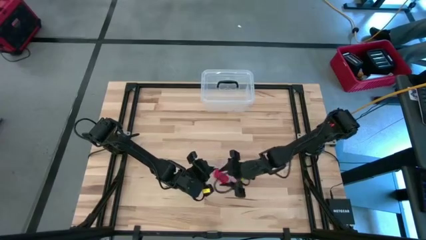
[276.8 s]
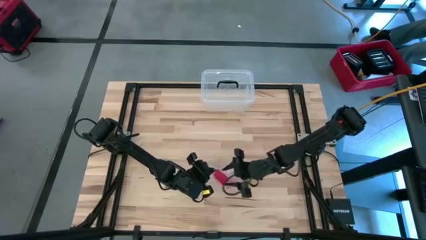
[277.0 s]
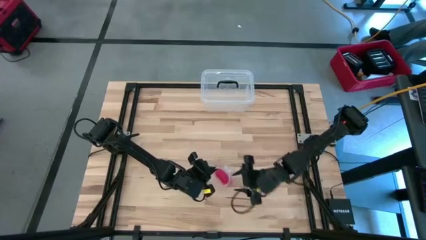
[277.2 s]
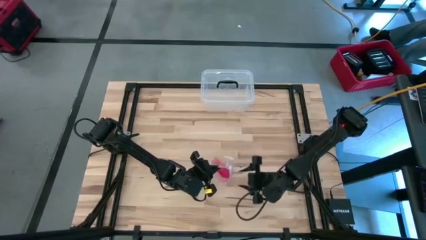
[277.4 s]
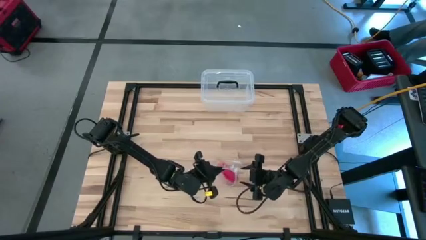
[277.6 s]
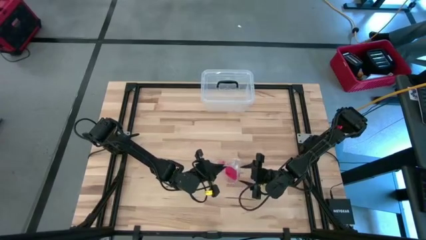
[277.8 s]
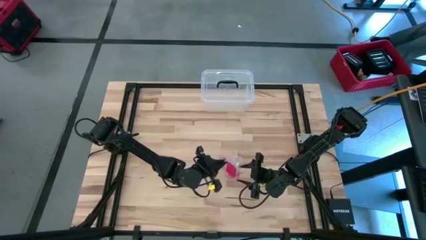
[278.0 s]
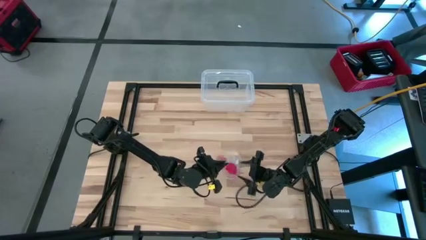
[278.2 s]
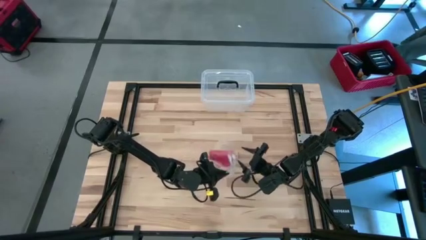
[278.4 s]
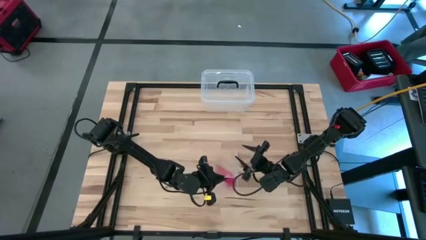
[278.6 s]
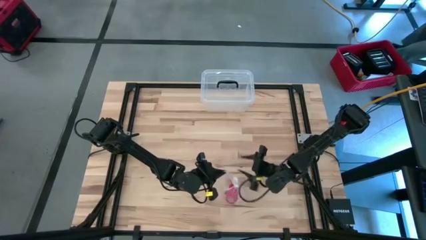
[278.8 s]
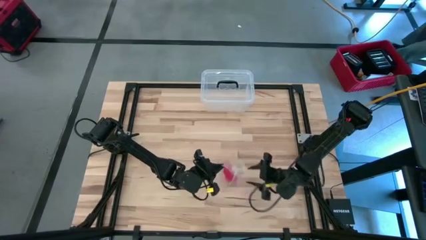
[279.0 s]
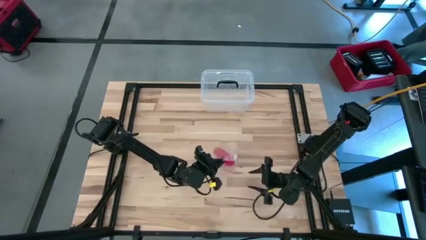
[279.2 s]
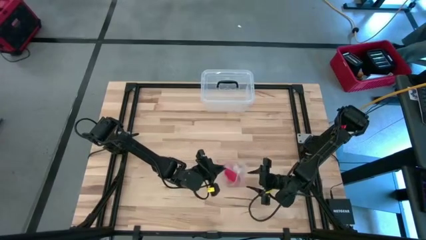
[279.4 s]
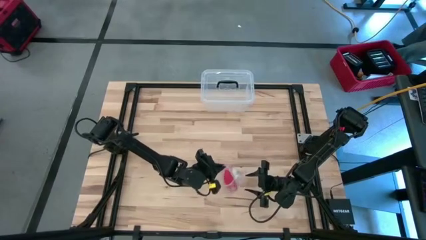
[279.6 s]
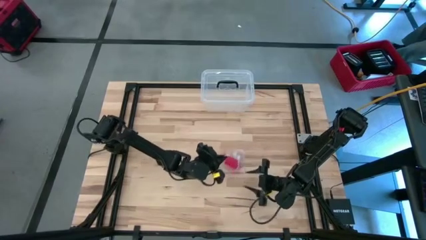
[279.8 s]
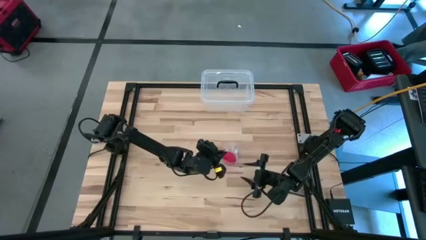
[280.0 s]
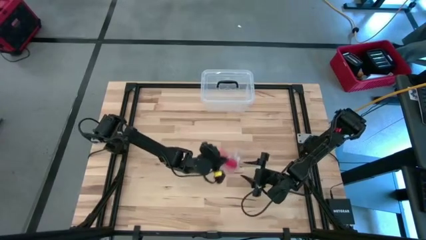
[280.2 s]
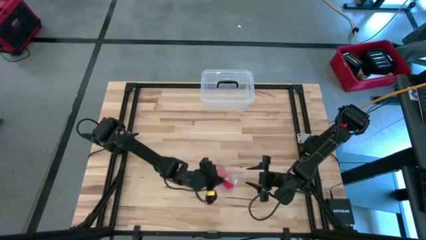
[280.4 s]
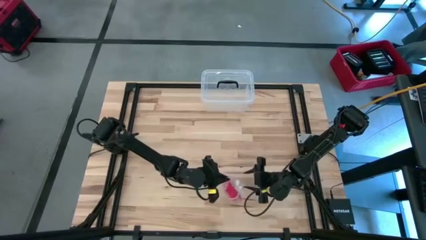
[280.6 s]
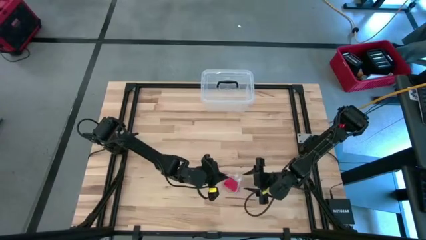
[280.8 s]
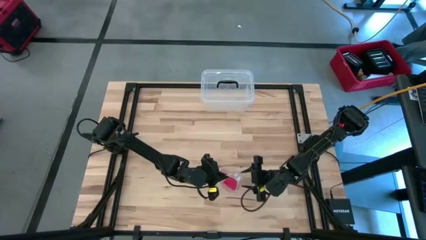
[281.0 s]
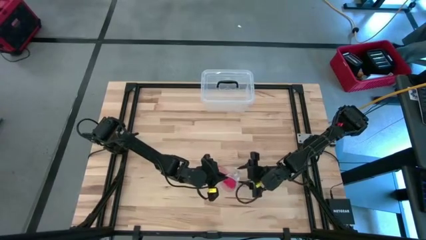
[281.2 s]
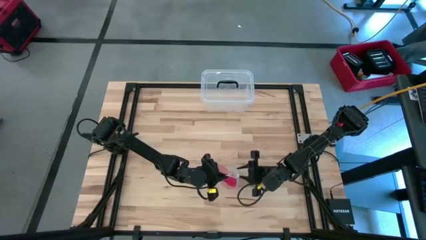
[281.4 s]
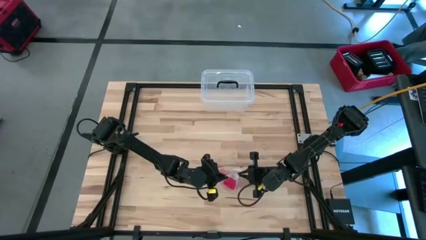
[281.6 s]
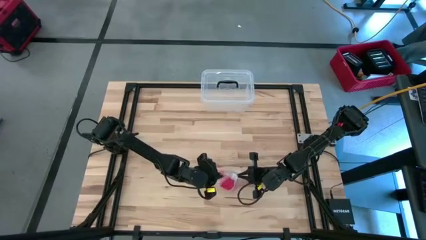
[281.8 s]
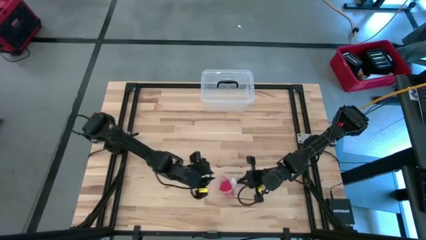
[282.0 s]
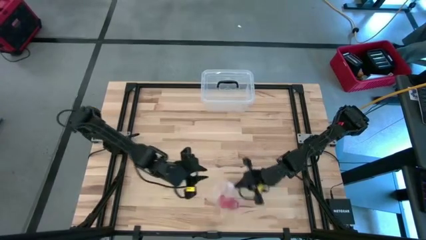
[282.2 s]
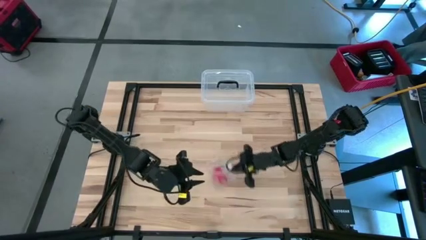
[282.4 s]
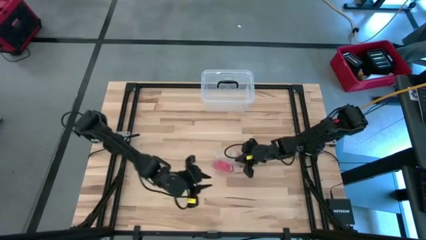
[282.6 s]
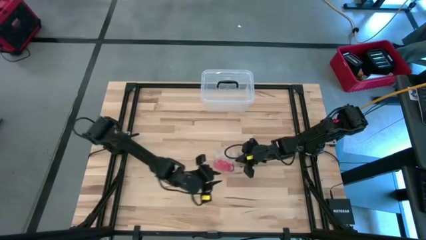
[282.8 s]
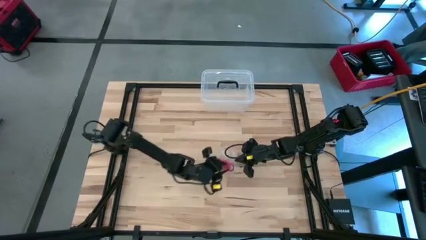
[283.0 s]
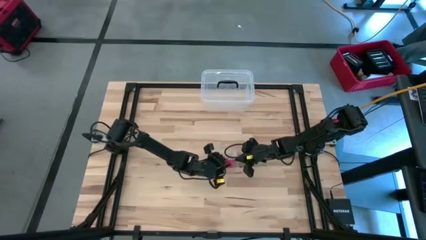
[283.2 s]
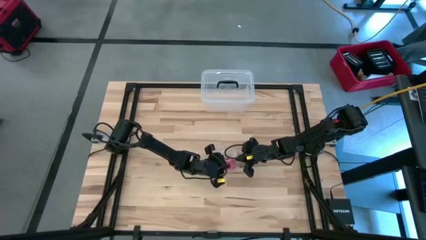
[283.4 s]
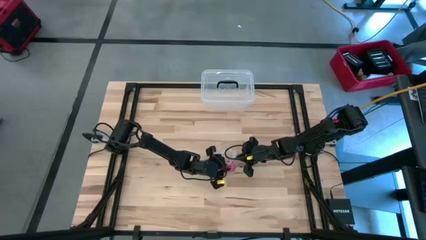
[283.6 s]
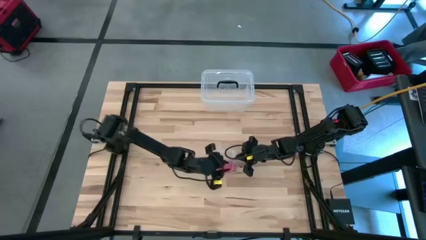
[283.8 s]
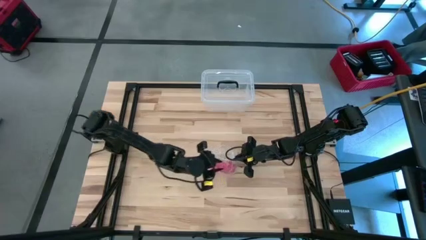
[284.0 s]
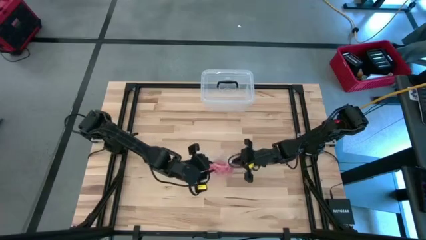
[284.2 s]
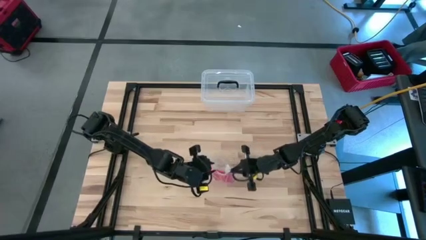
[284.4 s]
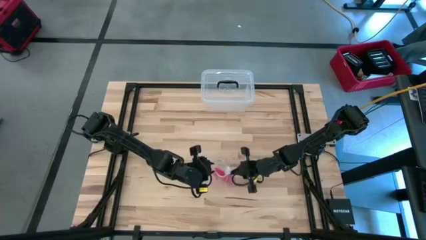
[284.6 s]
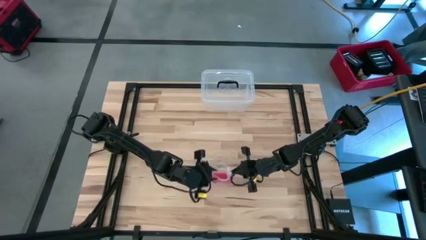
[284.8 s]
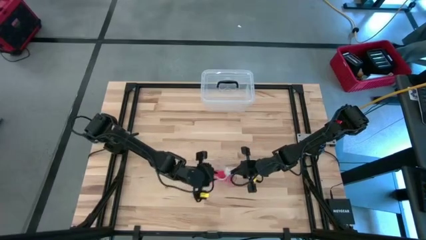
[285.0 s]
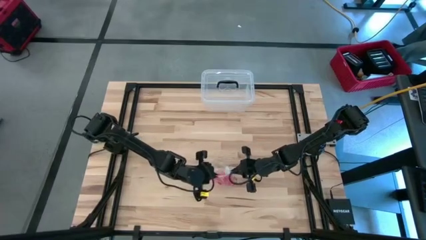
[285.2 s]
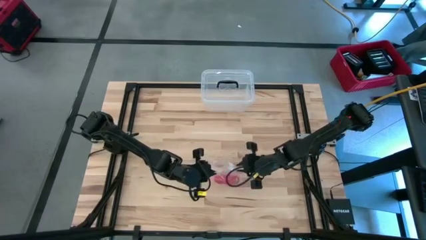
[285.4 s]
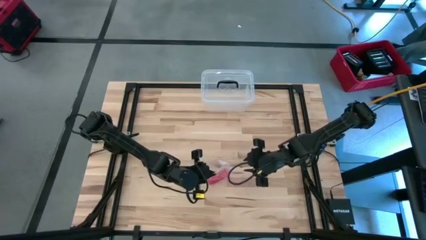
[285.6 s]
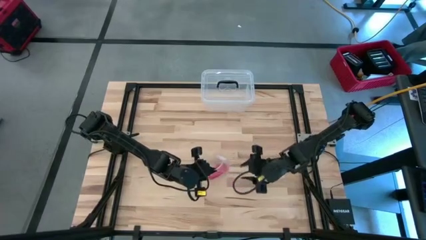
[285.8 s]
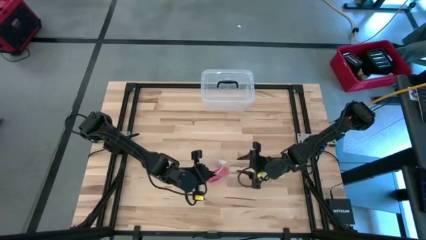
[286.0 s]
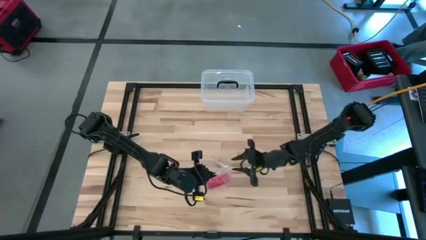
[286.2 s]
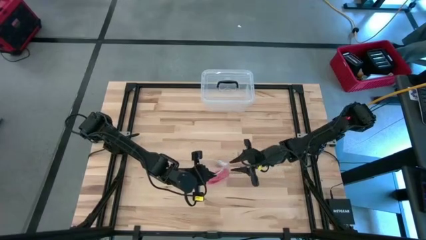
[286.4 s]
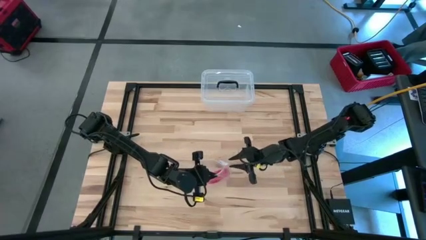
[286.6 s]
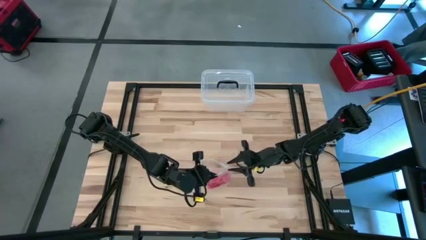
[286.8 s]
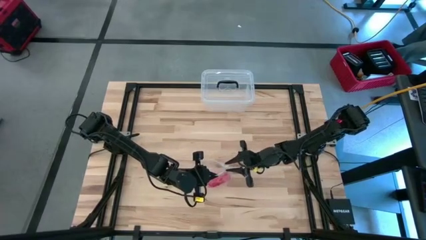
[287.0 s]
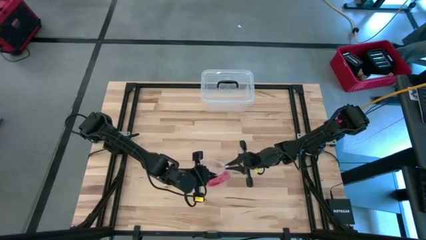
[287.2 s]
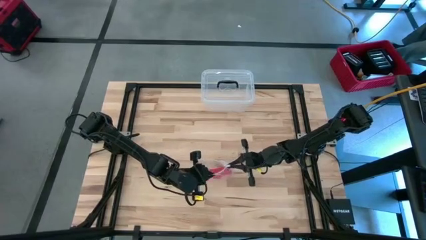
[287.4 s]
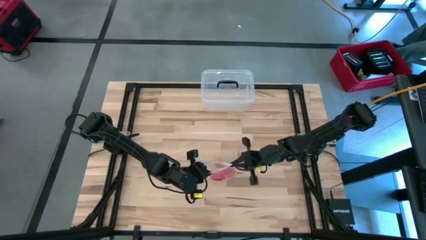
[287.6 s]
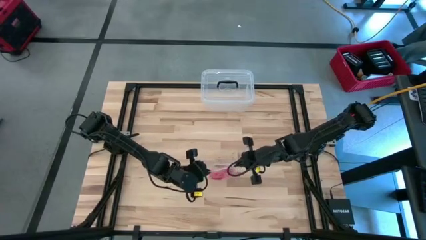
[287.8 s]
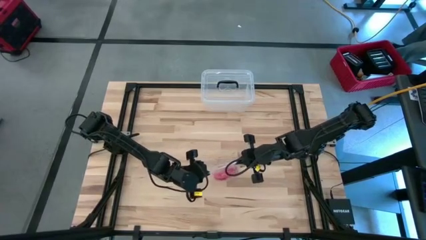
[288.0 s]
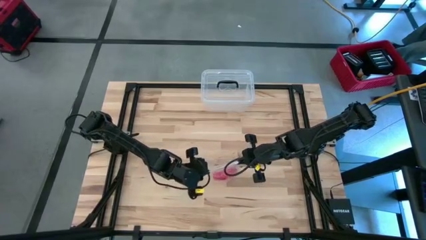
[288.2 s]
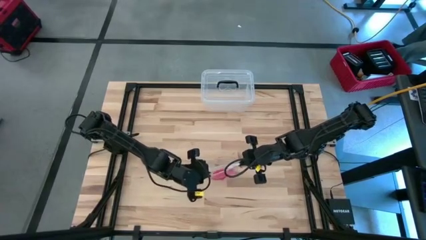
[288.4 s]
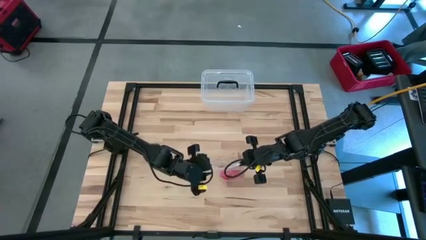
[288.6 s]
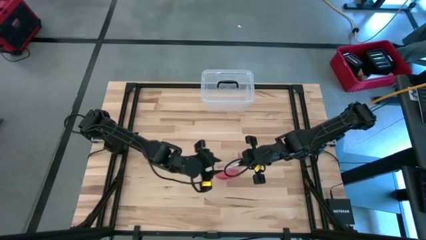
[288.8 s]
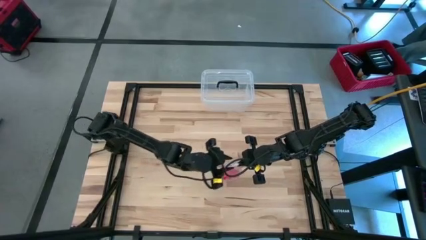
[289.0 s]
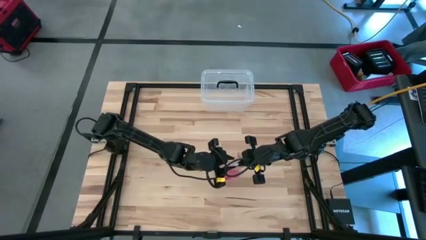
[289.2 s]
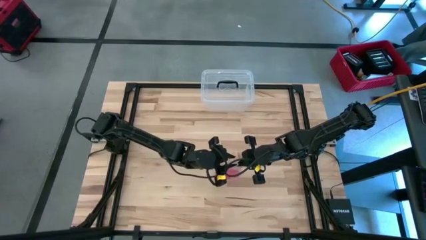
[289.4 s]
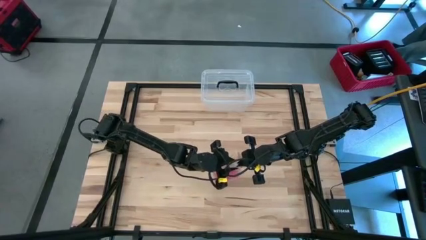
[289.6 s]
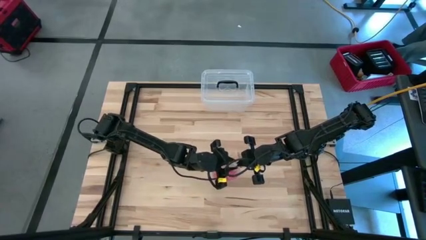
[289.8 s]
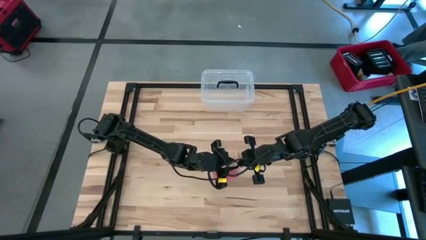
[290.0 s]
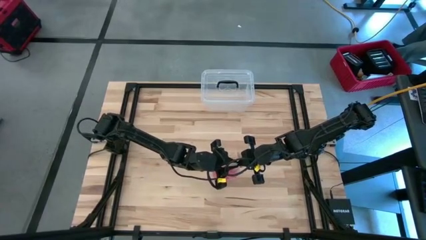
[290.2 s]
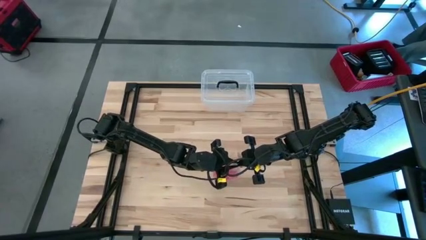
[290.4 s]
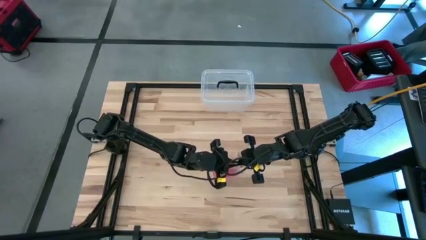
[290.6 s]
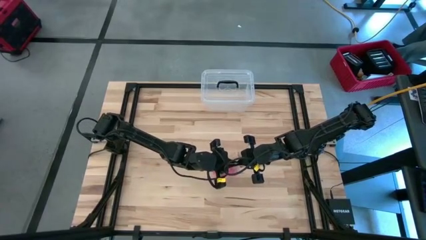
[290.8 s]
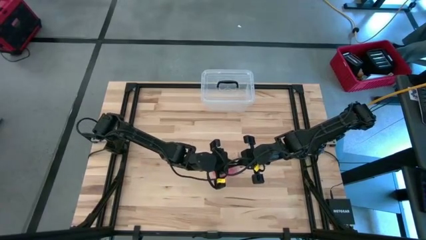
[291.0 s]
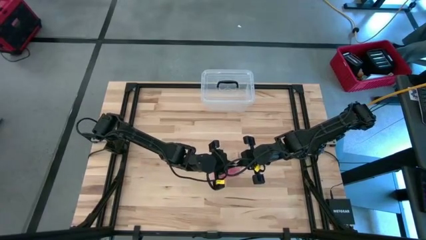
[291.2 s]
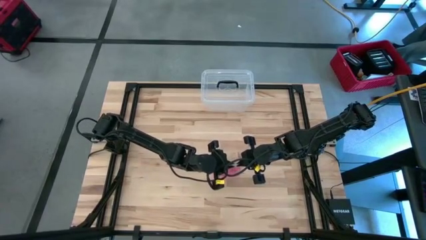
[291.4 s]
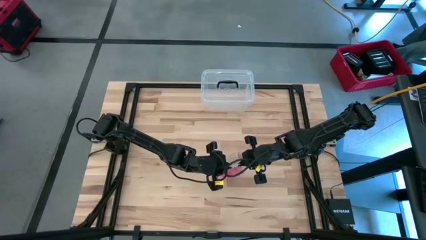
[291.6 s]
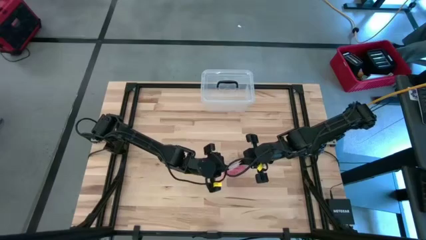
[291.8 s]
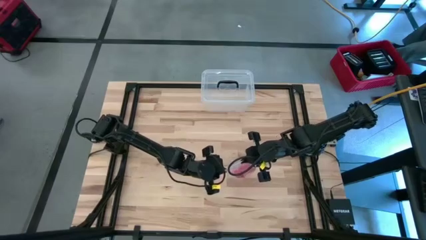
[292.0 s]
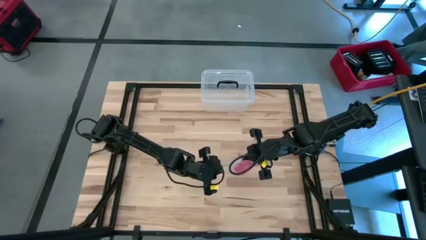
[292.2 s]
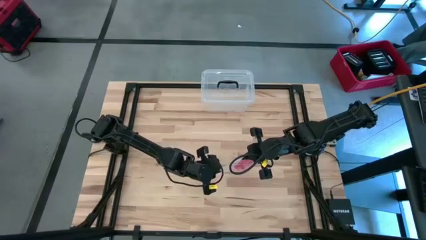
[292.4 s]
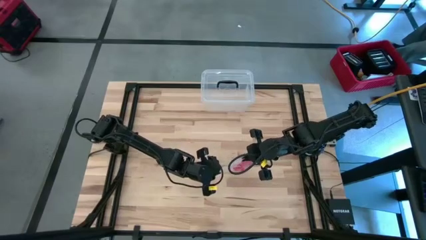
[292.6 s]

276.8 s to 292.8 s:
Task: Roll bandage
Close the transparent zip bag

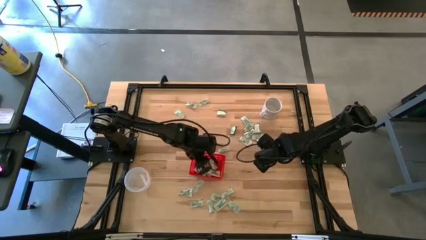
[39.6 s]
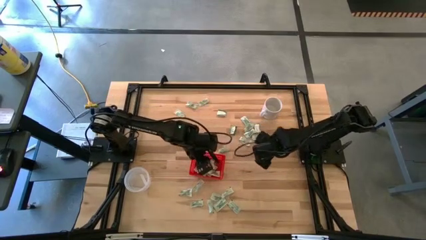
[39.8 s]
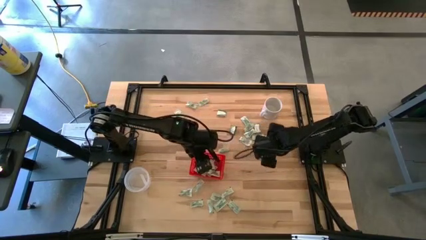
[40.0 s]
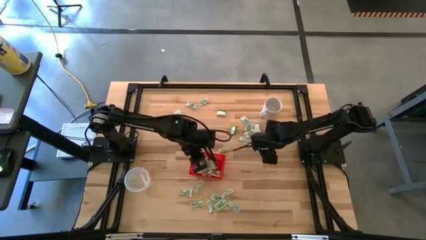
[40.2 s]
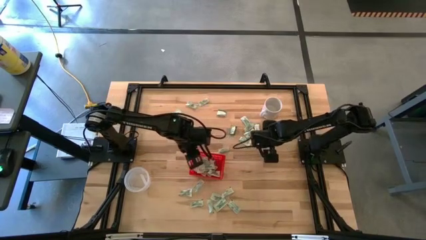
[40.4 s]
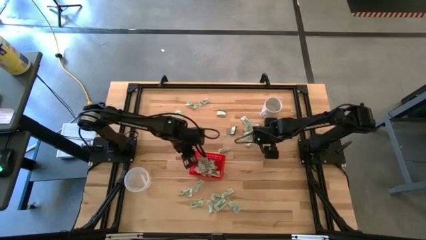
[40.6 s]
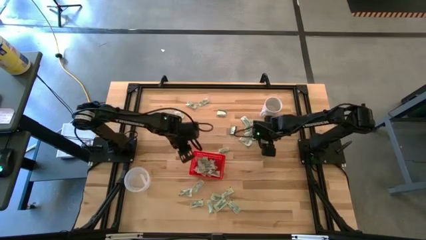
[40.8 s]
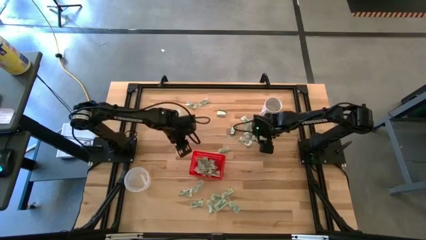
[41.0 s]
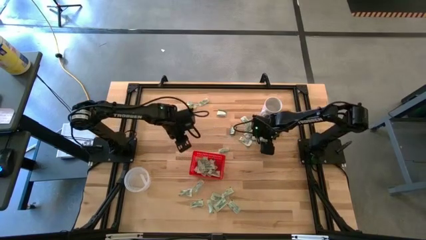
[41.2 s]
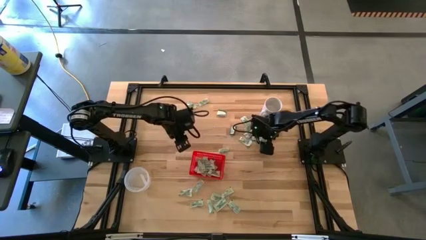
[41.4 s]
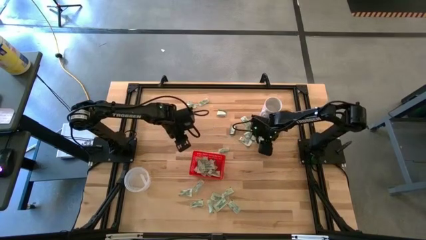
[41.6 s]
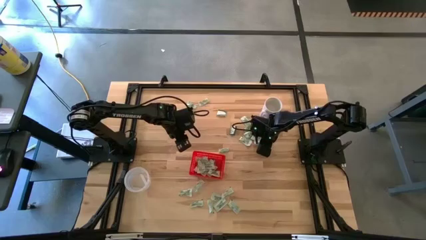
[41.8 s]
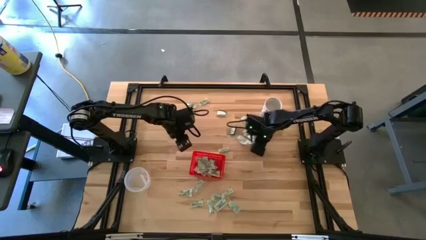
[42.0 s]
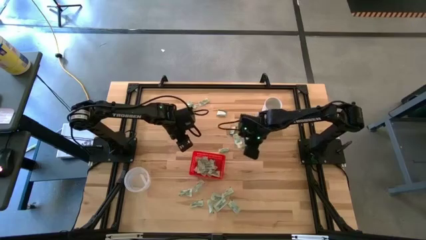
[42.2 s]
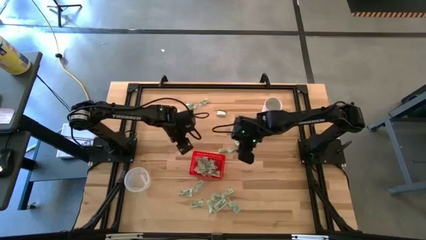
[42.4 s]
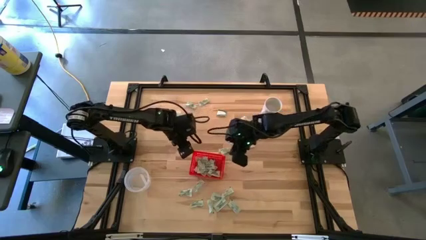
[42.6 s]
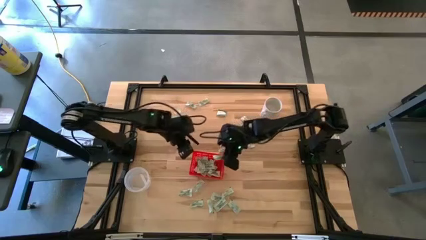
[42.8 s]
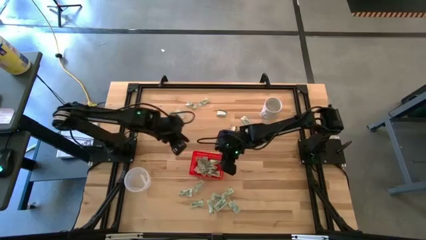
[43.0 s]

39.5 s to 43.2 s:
Task: Pick and place Stevia / Truvia into bins
Put the green stevia packet into the red basket
